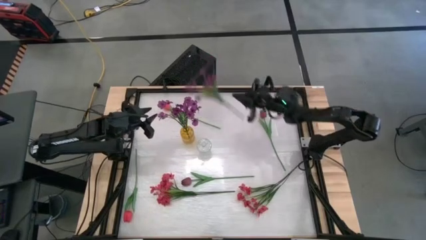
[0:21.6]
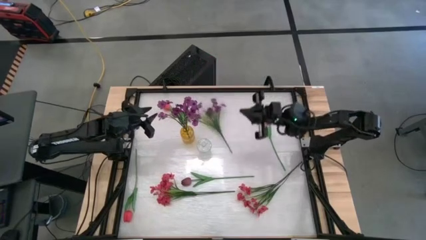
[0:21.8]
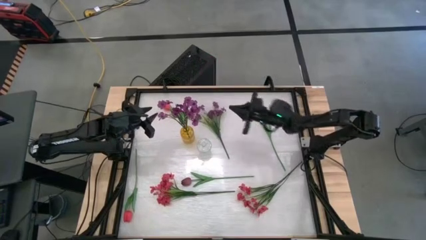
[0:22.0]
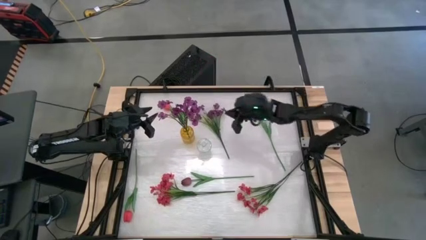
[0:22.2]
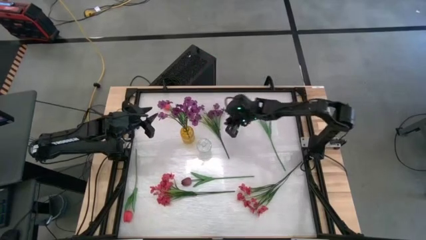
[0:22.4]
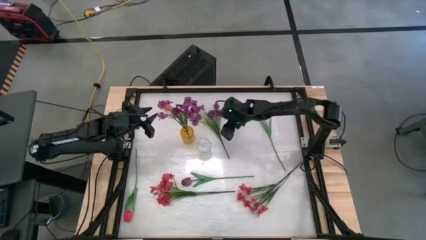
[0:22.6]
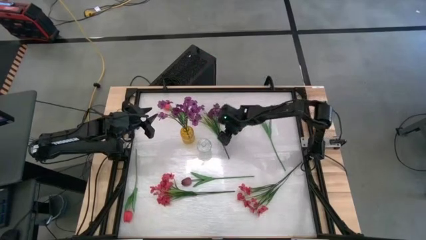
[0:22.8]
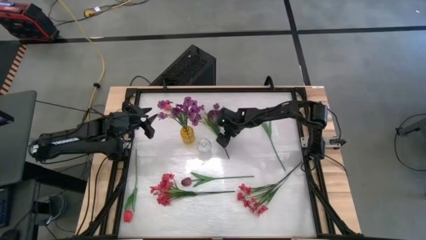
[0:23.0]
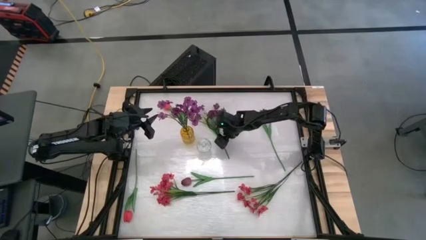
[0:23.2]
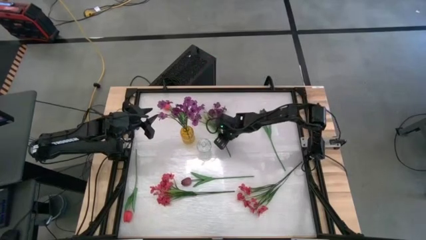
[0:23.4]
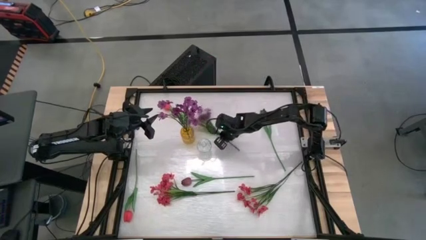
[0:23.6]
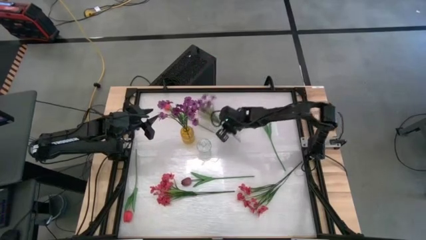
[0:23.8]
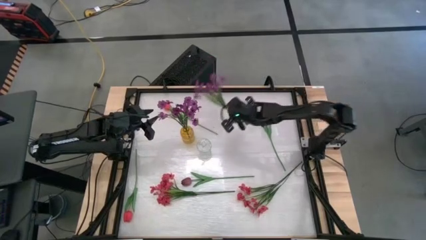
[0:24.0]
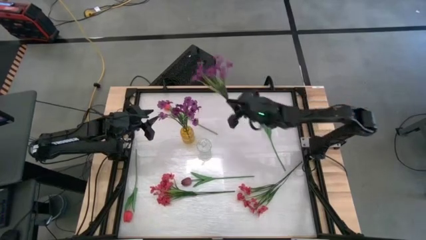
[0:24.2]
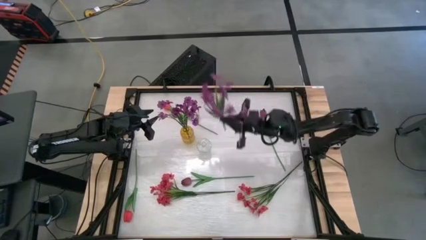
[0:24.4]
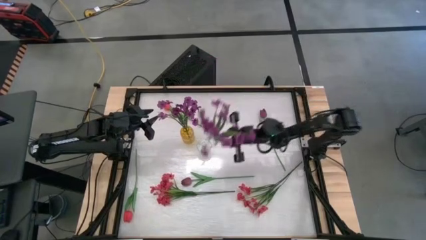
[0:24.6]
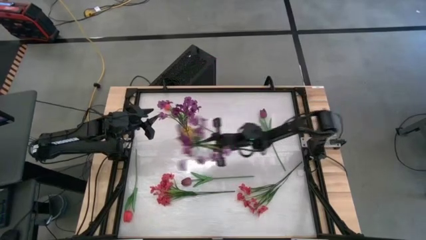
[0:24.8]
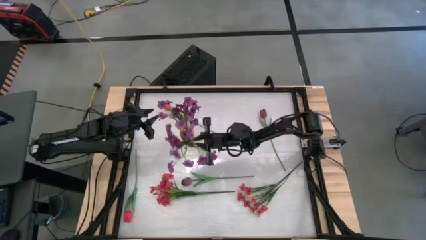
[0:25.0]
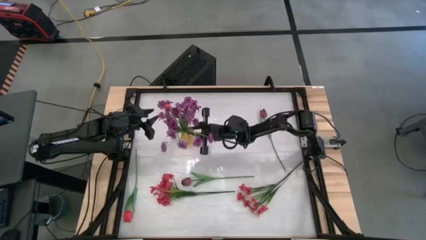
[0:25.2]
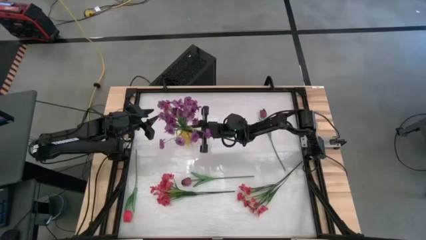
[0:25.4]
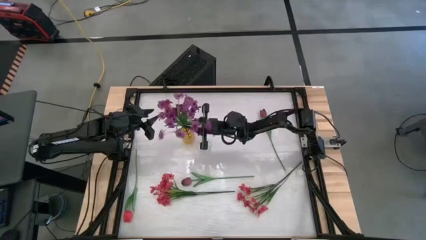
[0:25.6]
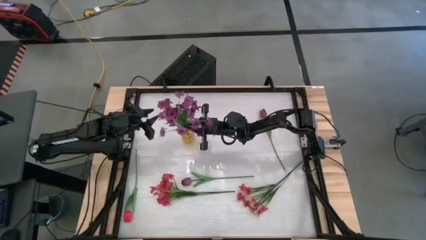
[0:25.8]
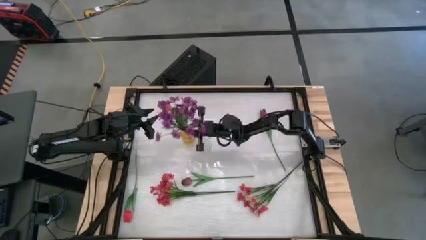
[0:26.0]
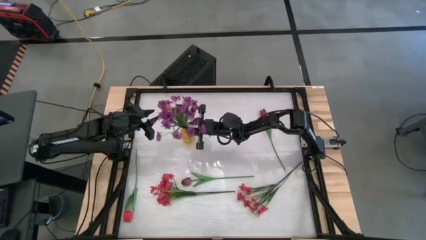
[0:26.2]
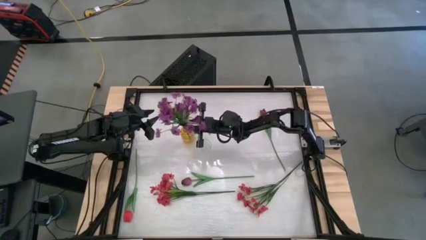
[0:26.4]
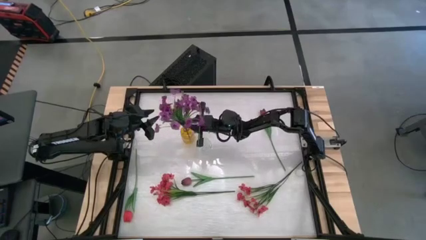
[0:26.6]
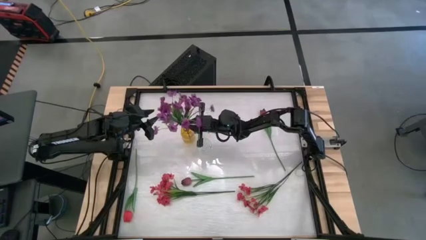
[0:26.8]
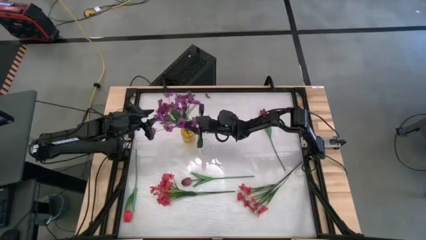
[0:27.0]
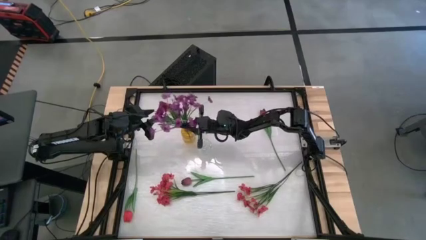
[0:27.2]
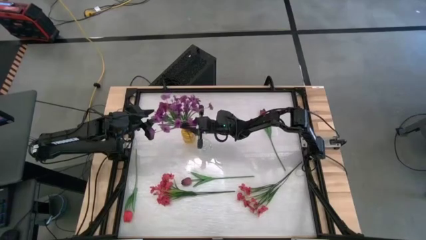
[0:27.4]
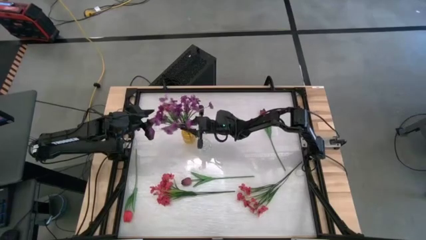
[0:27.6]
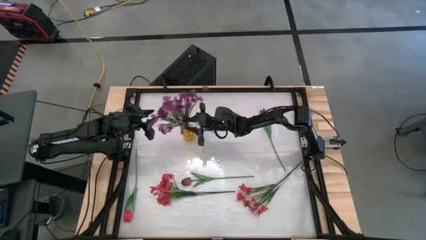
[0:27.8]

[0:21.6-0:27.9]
Task: Sort flowers into vase by color
Put the violet flowers into the yellow vase

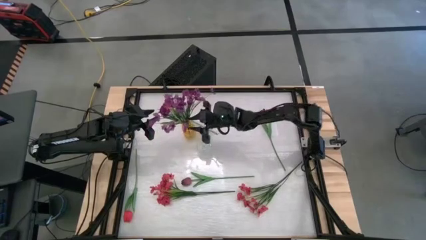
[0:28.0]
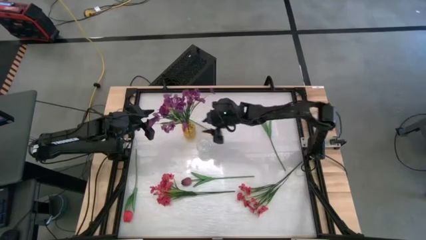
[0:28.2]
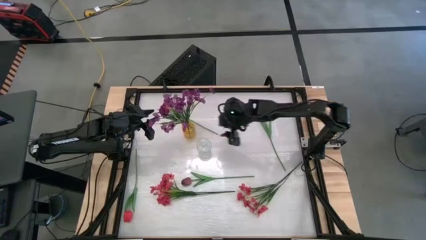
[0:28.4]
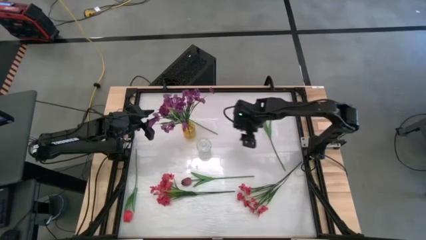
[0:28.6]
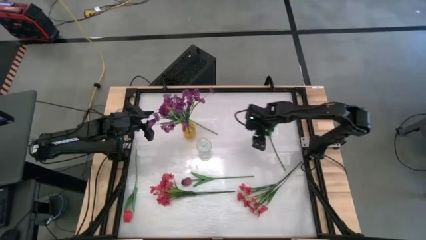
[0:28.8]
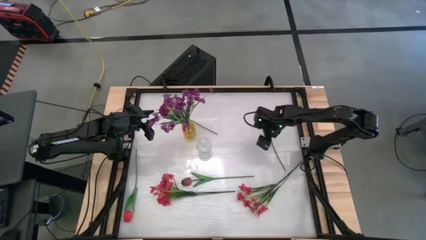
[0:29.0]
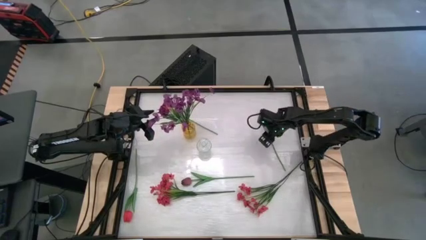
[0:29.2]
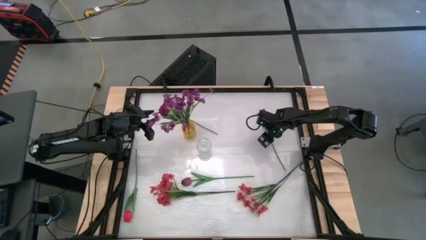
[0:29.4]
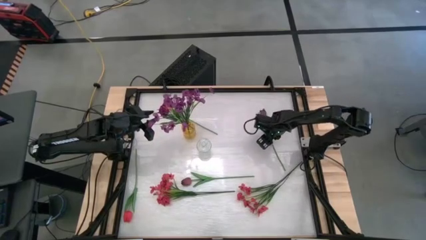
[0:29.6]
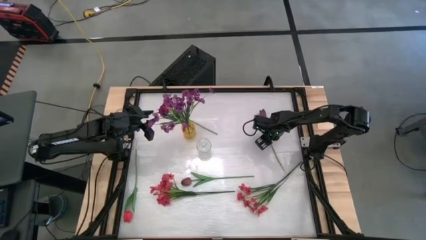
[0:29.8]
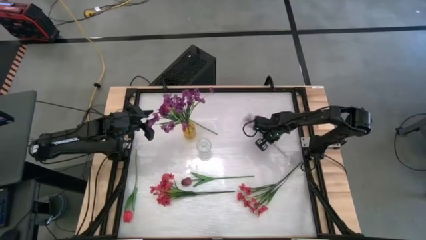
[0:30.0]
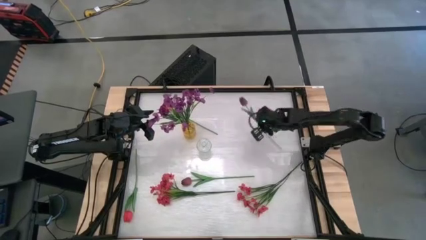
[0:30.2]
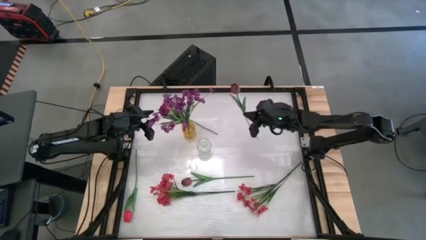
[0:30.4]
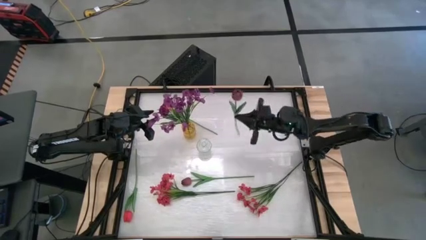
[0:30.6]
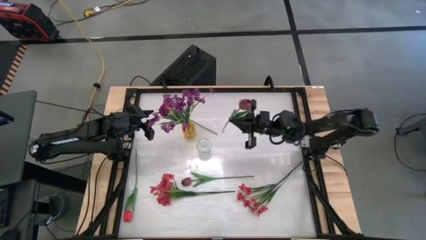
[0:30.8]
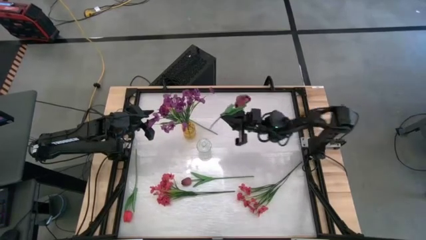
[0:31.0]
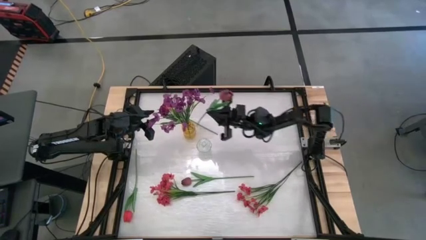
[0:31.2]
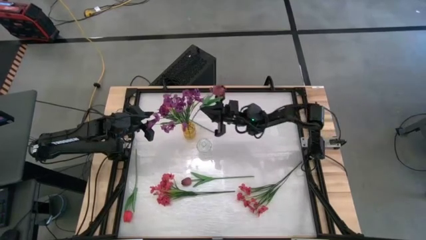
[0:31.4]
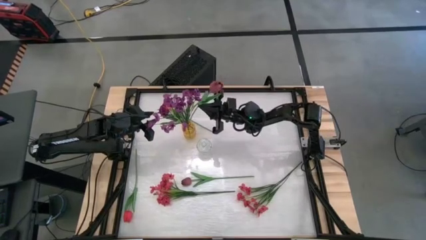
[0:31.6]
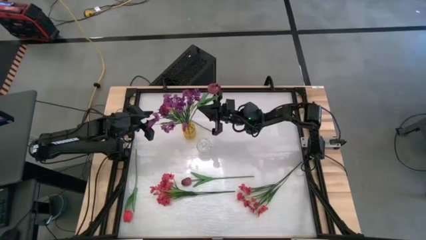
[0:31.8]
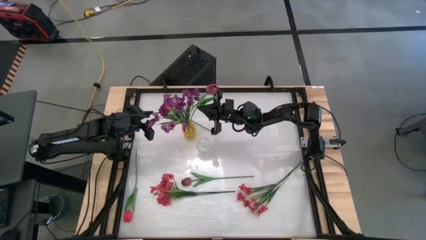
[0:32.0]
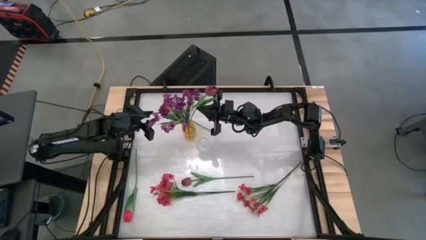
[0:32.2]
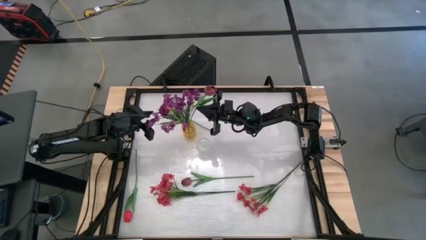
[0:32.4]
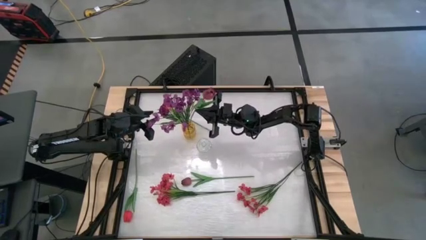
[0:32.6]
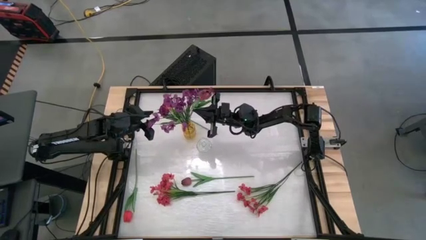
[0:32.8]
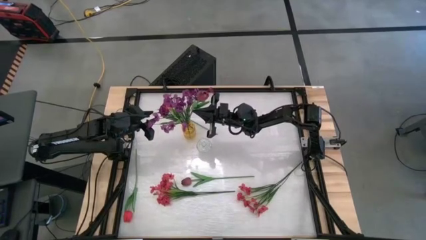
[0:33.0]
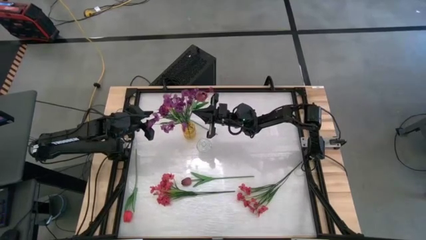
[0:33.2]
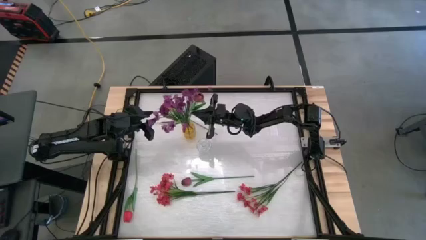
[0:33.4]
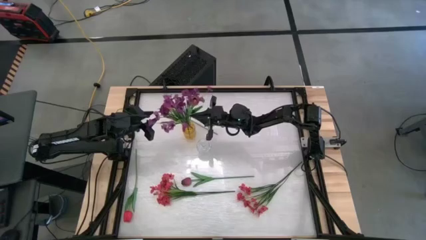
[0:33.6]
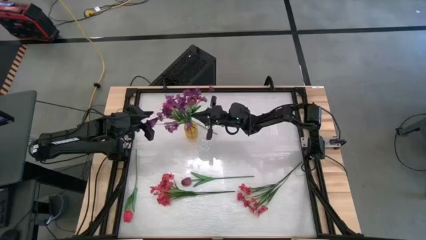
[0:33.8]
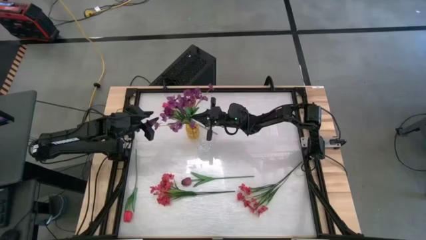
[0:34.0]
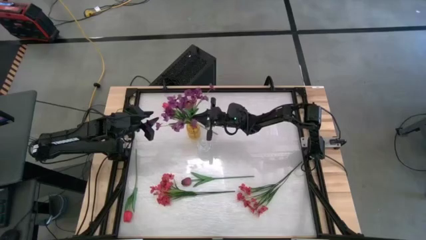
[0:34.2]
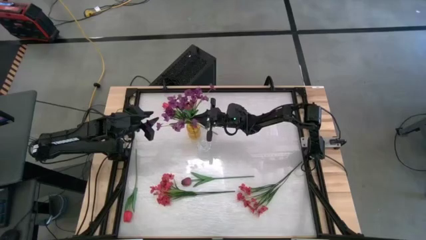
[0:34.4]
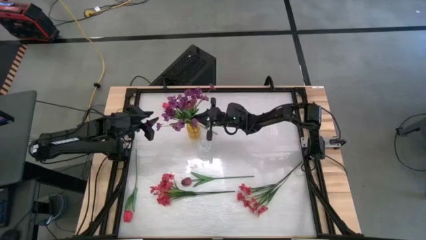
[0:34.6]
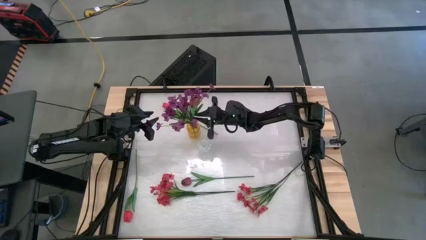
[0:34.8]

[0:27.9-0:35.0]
Put the top red flower into the yellow vase

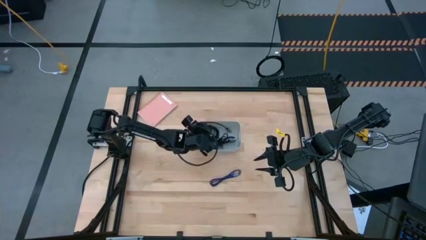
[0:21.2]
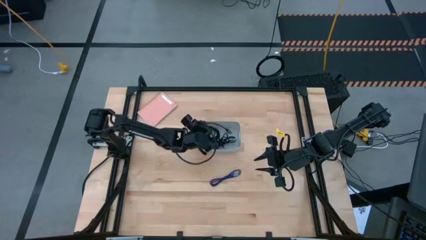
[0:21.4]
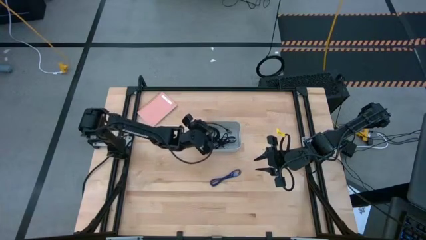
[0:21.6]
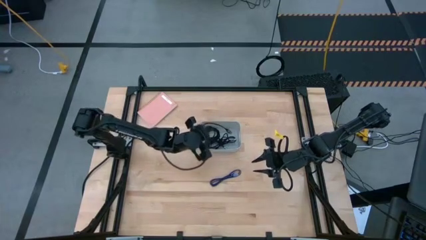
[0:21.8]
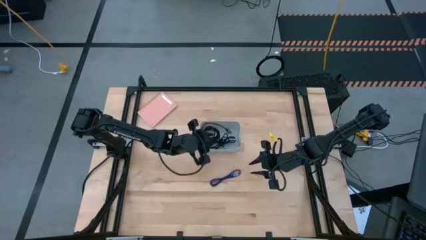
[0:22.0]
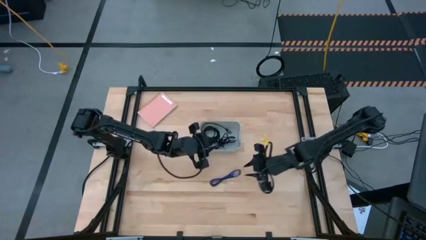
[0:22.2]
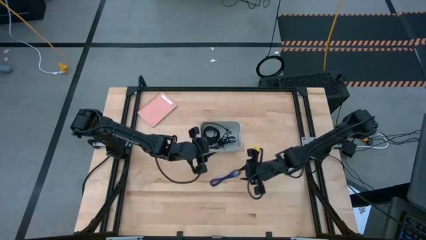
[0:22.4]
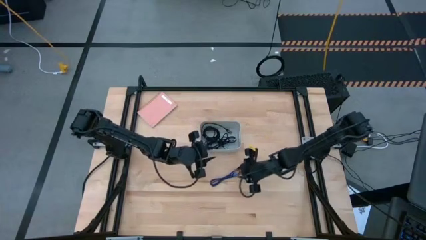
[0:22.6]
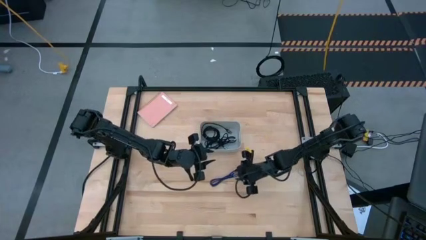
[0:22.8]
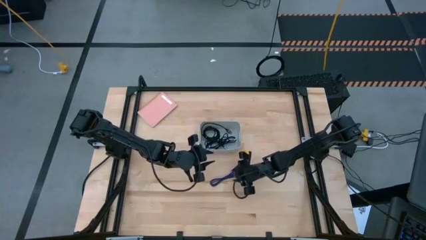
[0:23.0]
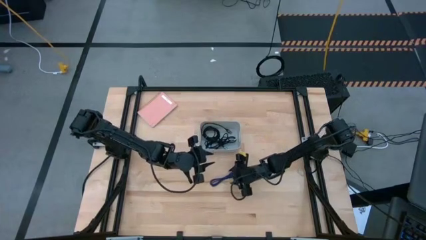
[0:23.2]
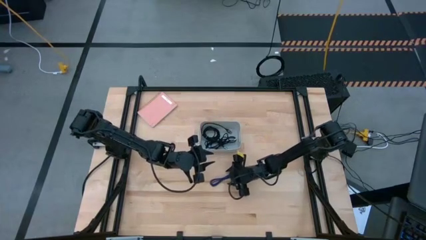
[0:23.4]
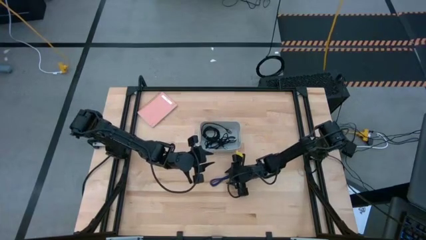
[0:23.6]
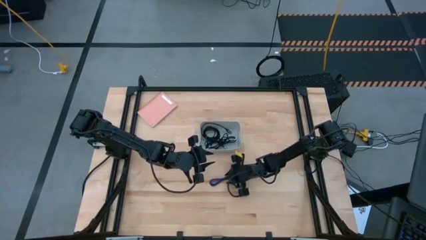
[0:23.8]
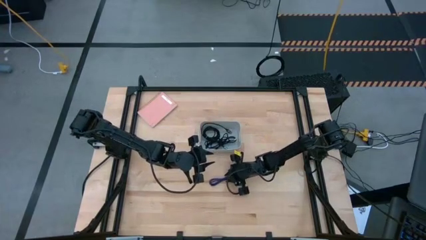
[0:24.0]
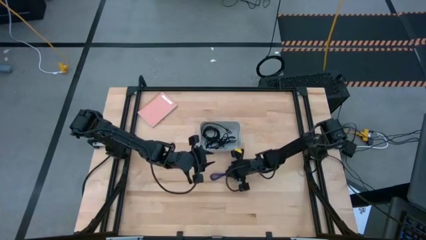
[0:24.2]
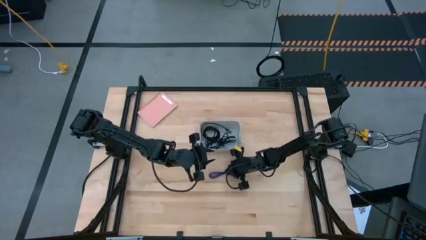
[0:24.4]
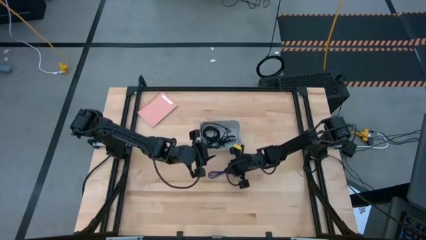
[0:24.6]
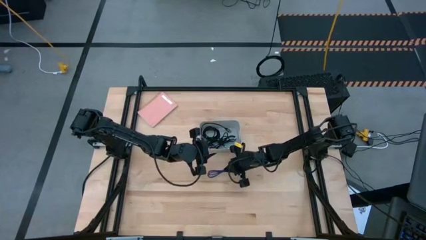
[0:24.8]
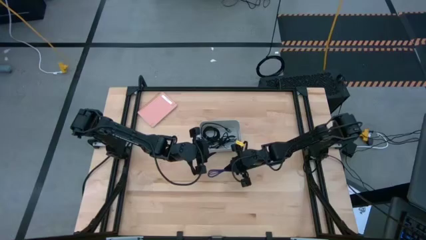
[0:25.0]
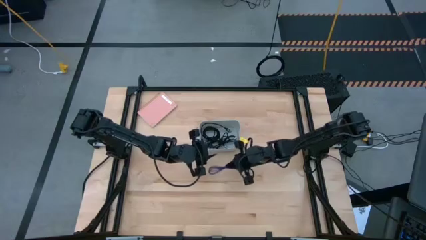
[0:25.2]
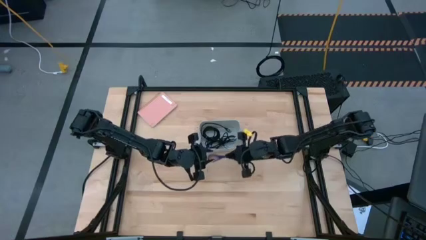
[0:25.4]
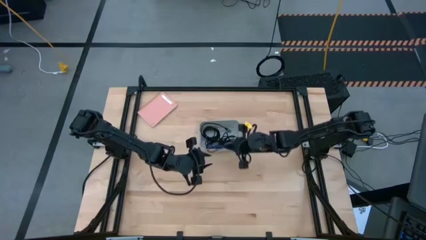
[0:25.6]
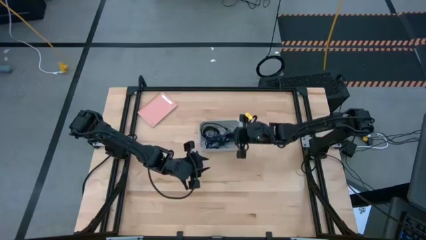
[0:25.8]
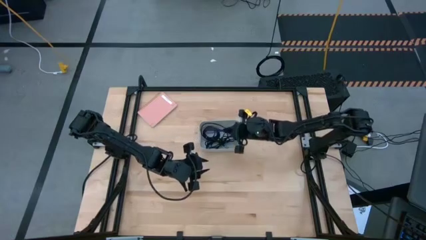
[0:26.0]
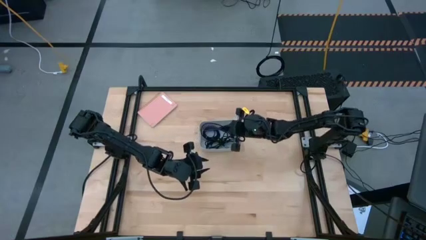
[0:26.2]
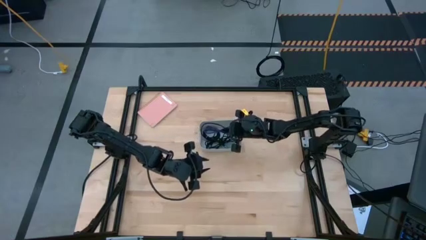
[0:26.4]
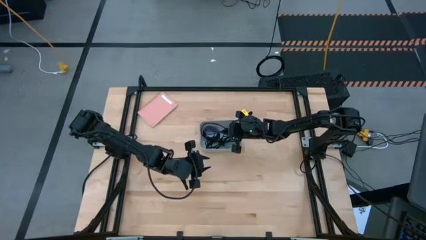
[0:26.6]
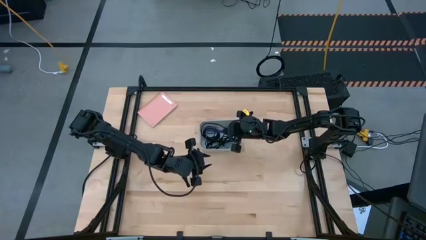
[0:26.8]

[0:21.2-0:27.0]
Task: Pick and place USB-C Cables
Put the blue charger cable into the gray bin
